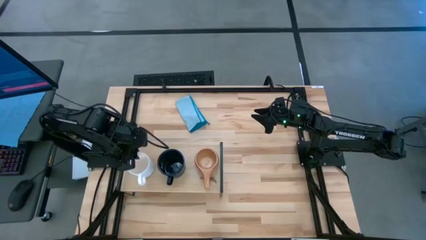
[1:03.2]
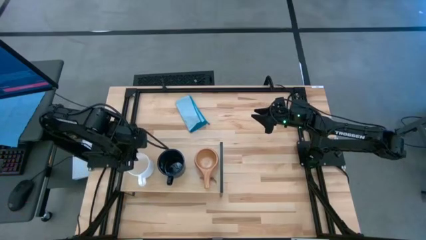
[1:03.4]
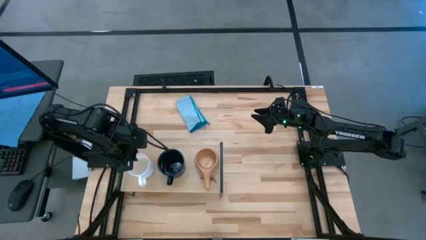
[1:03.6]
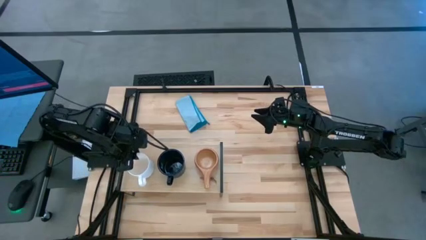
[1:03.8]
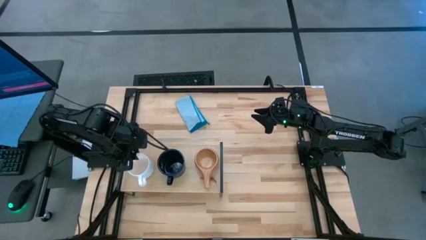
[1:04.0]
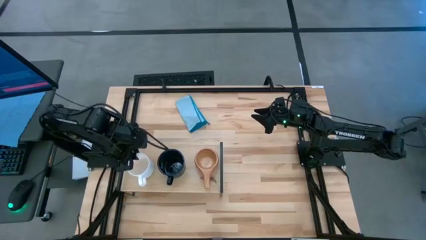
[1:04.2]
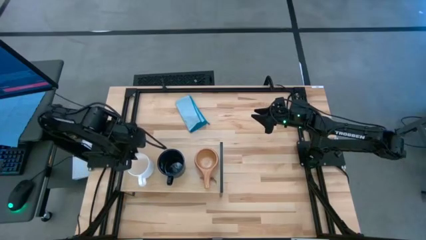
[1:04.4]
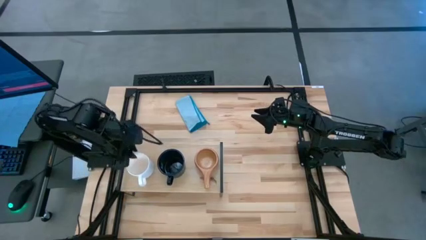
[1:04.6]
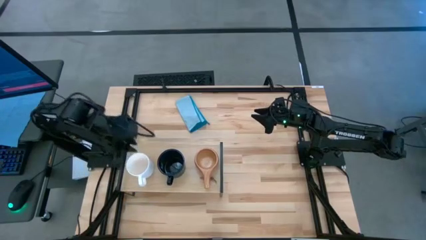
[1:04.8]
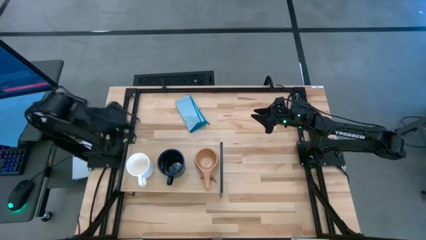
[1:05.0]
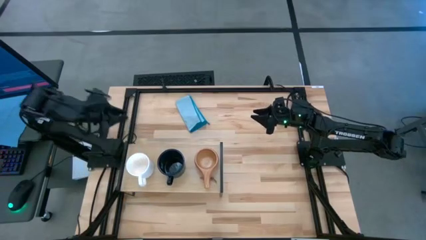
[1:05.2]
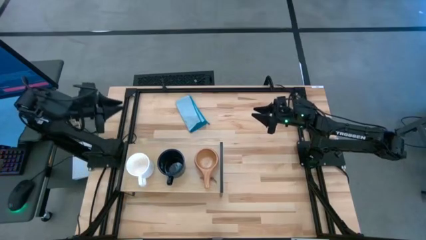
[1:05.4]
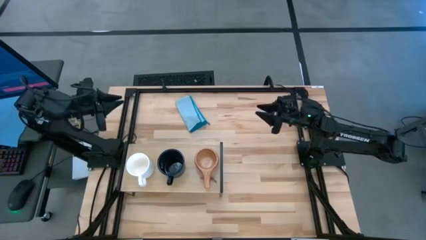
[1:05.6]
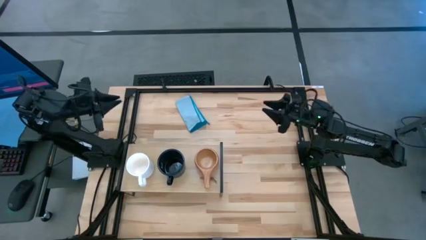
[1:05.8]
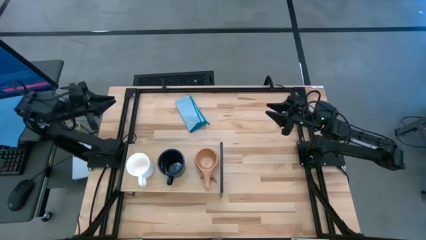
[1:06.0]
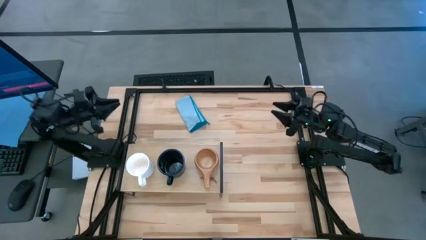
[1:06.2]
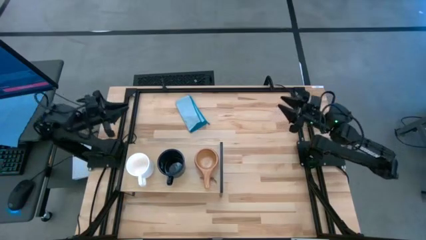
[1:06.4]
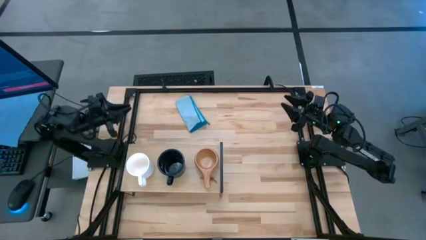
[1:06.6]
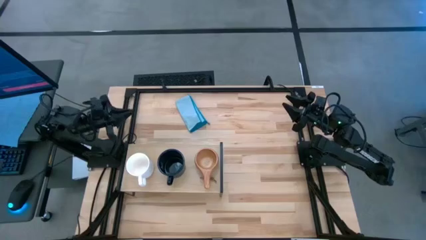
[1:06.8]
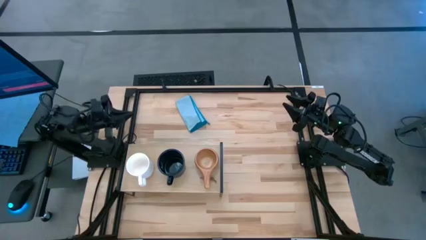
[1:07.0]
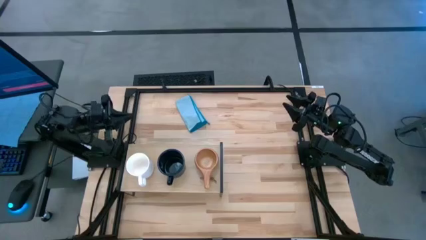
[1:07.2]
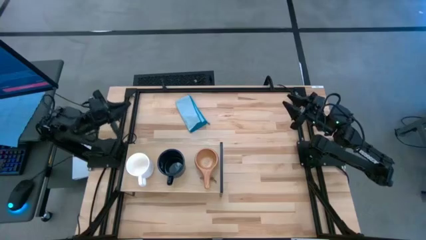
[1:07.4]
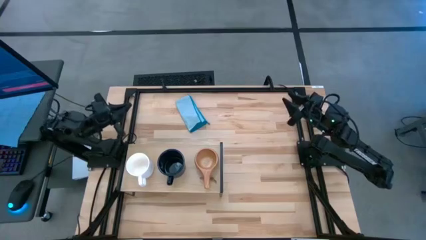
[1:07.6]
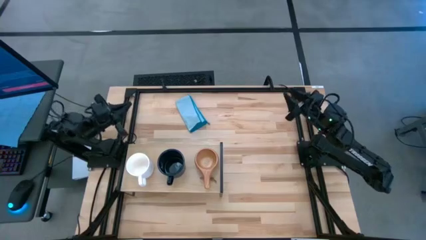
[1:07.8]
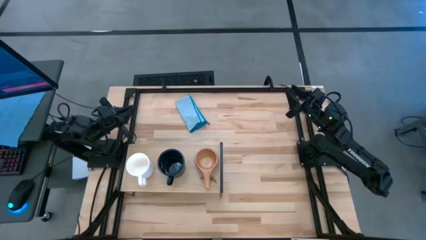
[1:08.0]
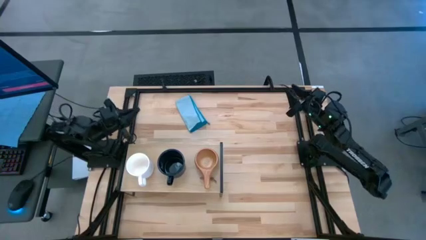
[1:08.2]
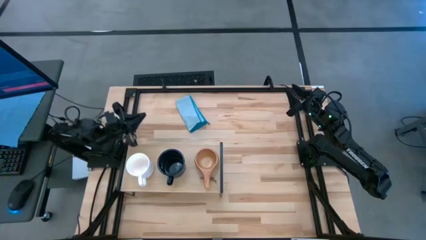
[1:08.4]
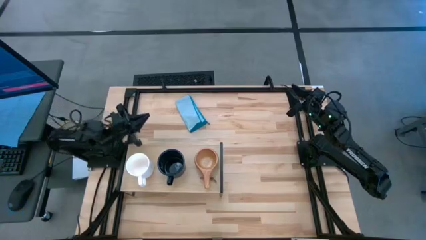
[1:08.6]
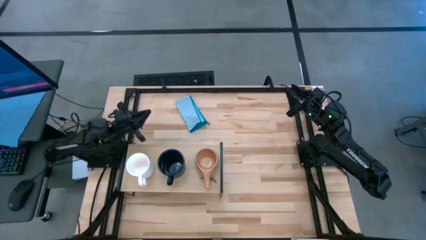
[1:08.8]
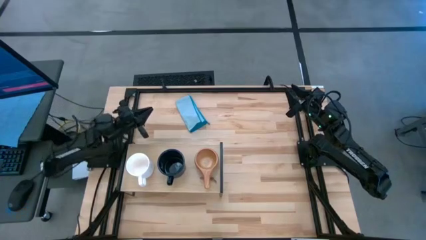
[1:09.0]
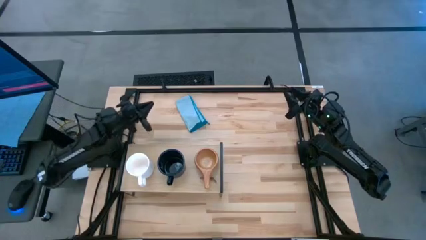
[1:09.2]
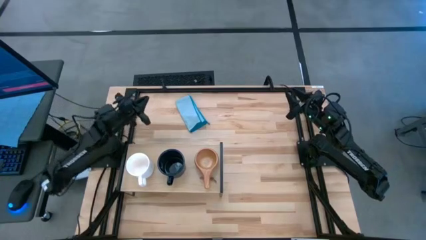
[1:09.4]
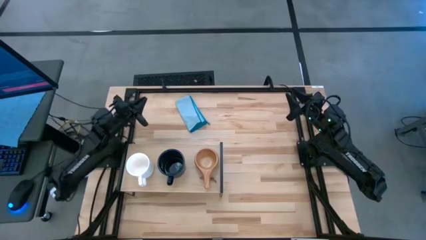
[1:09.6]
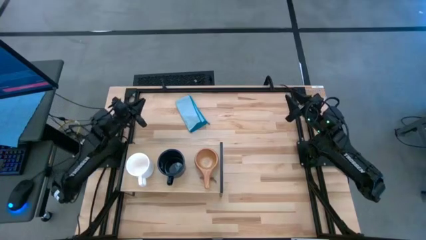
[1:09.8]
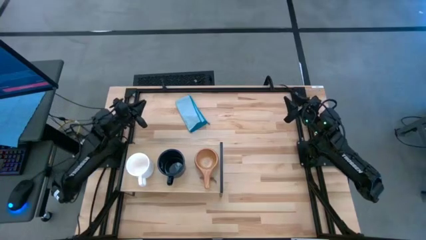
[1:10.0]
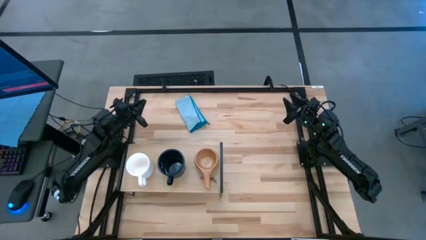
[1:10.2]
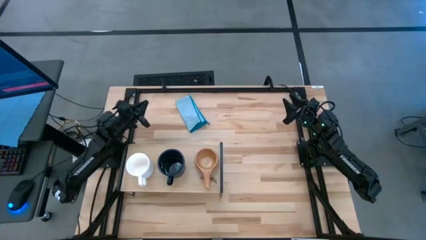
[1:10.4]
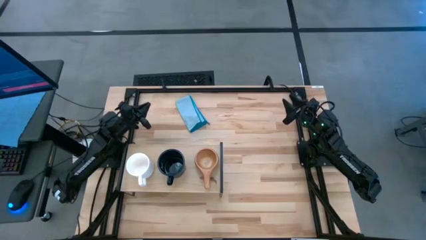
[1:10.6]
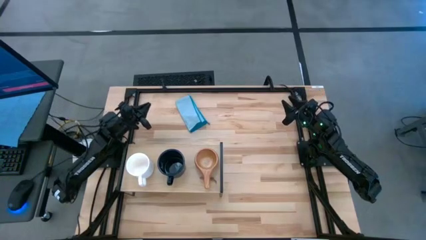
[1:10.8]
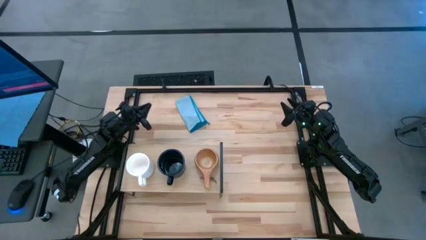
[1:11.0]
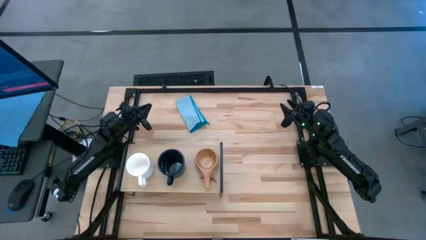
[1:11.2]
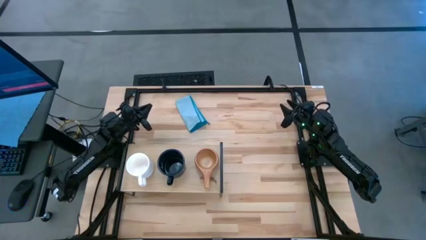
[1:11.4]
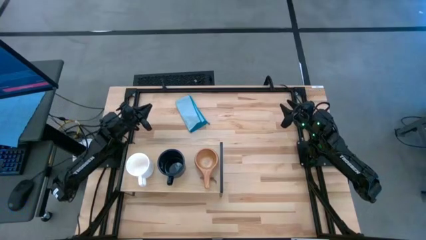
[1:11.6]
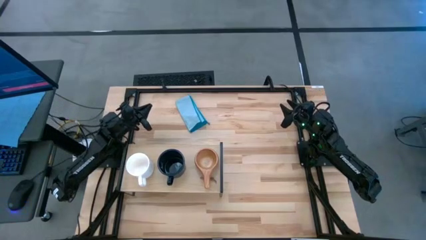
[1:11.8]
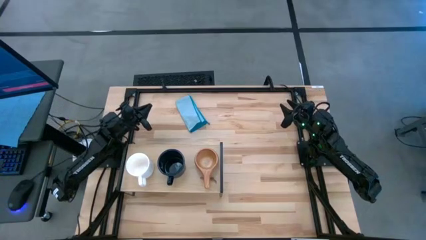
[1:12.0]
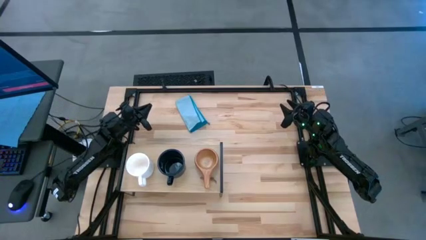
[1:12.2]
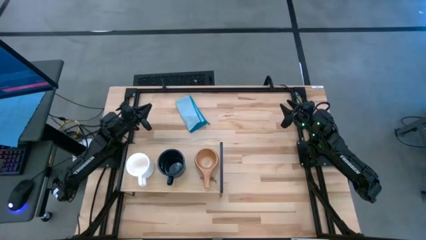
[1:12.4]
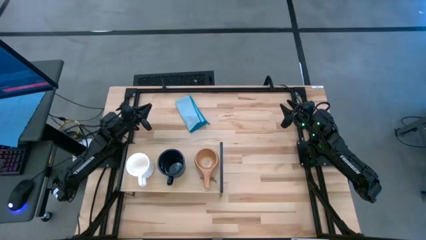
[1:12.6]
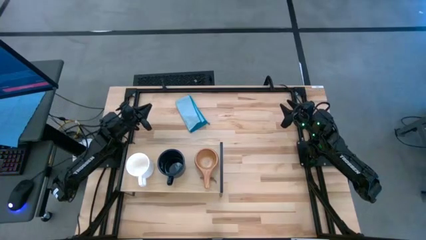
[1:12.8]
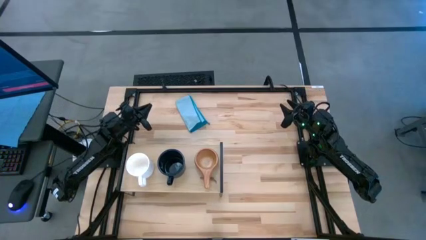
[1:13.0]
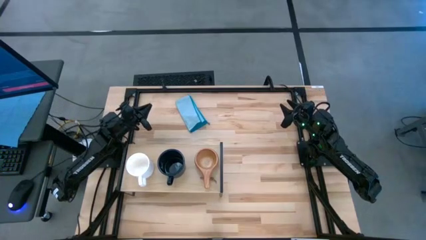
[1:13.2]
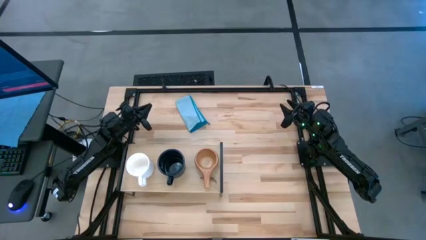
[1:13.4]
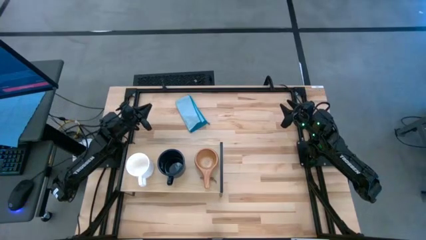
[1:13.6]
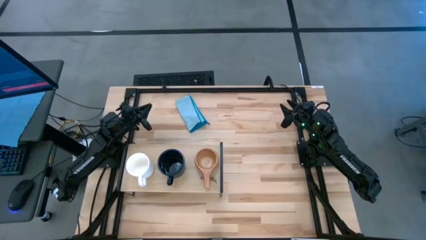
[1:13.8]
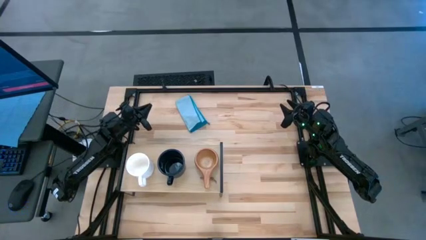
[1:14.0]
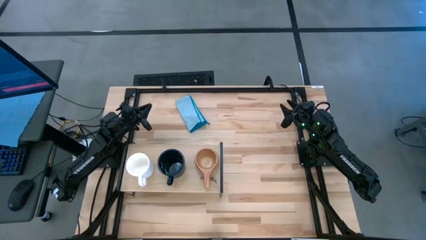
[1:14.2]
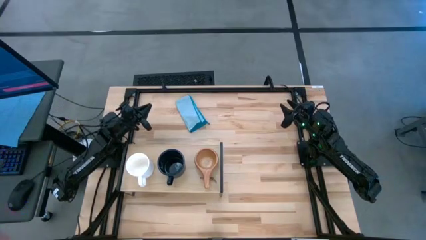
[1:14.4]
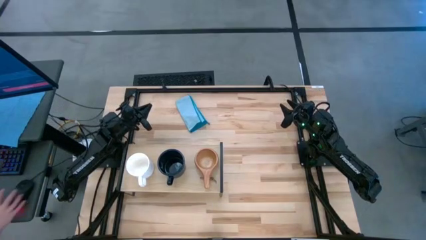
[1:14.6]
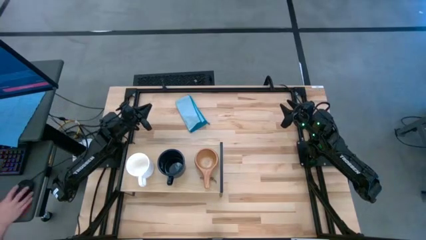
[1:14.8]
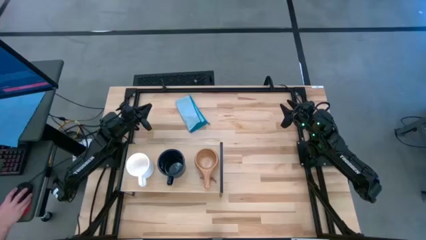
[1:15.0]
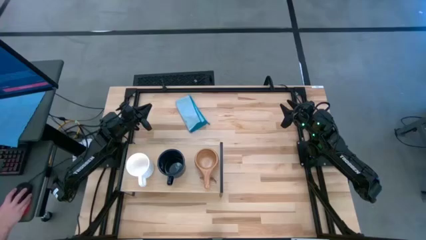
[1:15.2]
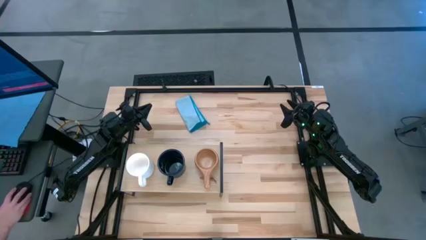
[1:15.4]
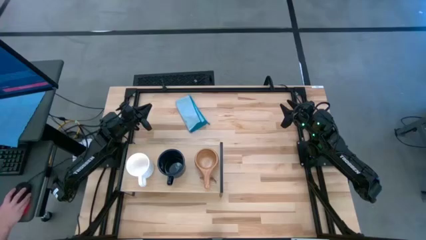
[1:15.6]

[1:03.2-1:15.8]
Task: Stack small to large cups/mugs on shelf
Return to Home Position
